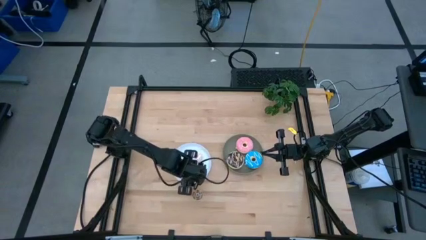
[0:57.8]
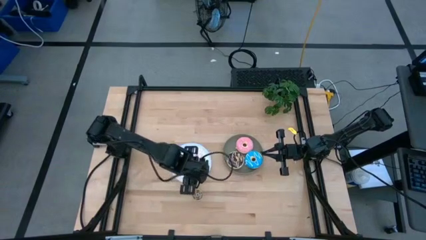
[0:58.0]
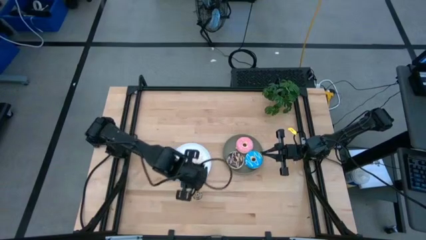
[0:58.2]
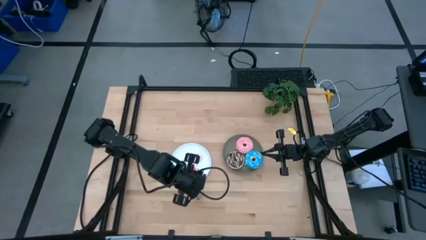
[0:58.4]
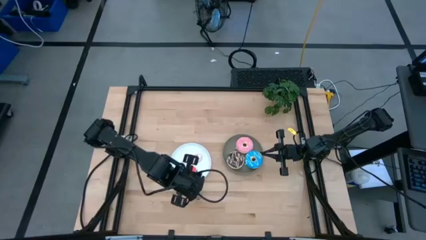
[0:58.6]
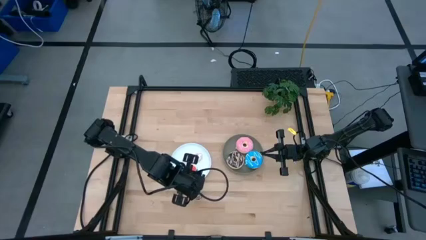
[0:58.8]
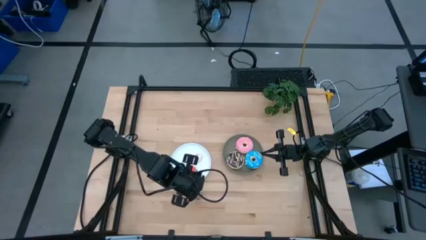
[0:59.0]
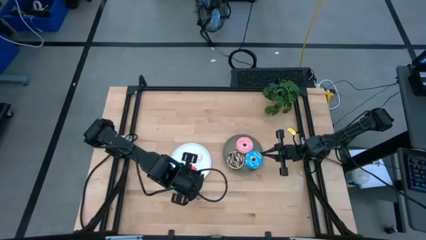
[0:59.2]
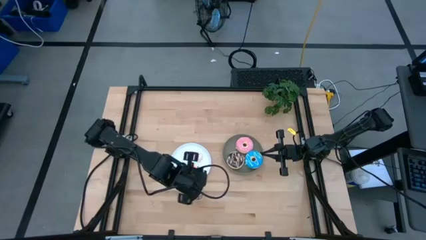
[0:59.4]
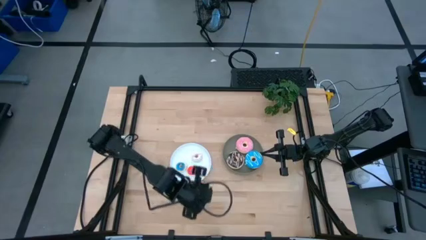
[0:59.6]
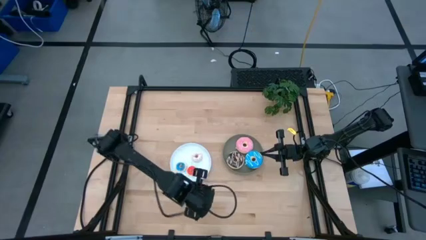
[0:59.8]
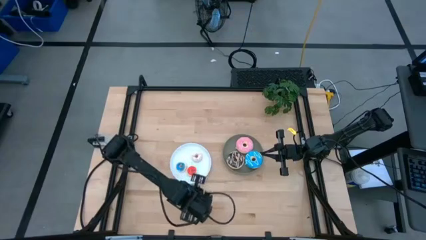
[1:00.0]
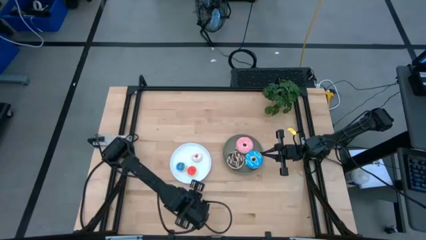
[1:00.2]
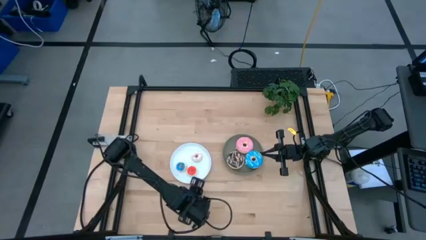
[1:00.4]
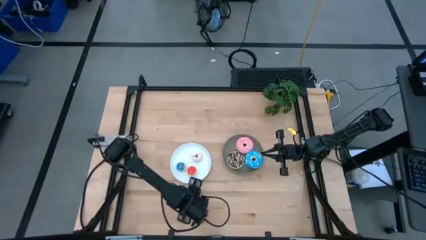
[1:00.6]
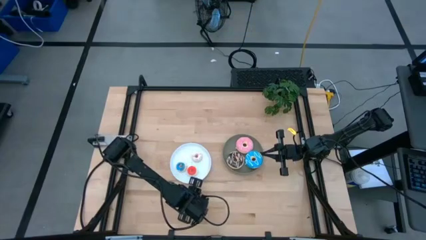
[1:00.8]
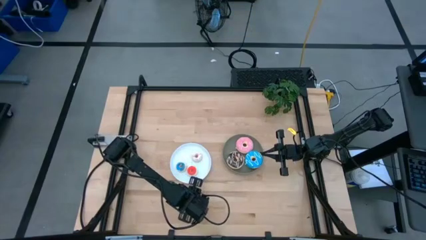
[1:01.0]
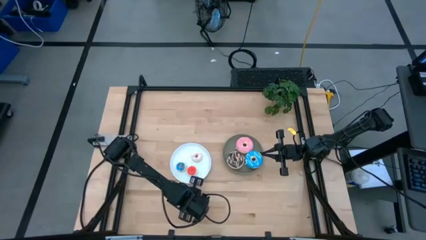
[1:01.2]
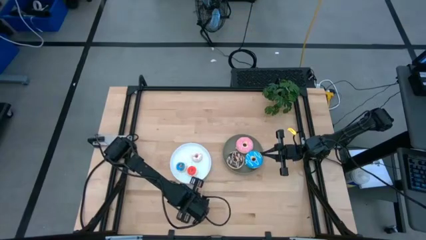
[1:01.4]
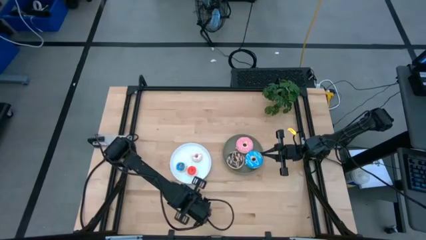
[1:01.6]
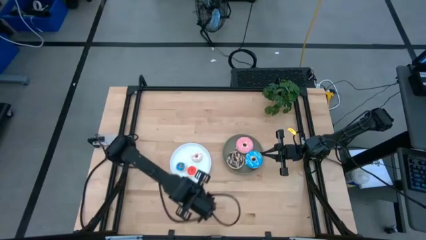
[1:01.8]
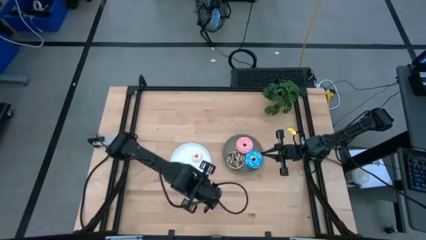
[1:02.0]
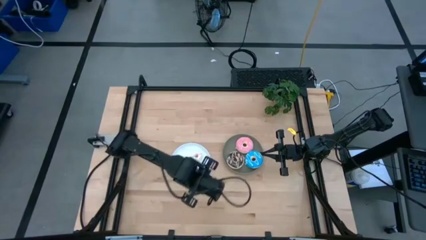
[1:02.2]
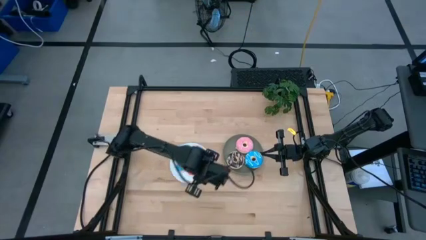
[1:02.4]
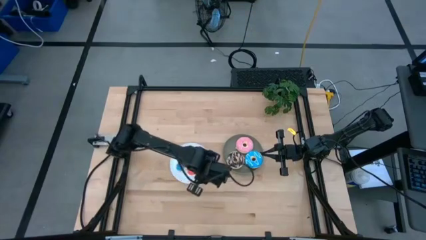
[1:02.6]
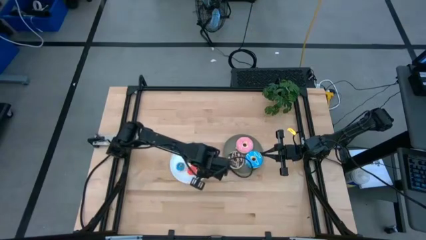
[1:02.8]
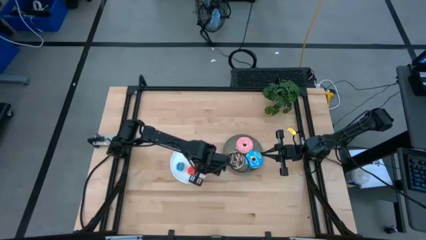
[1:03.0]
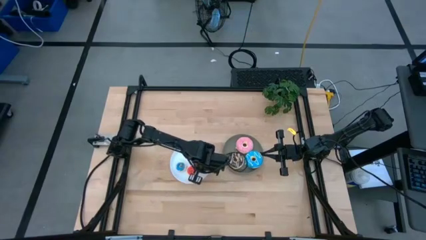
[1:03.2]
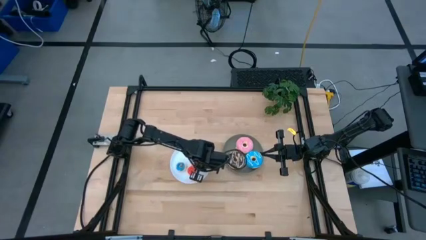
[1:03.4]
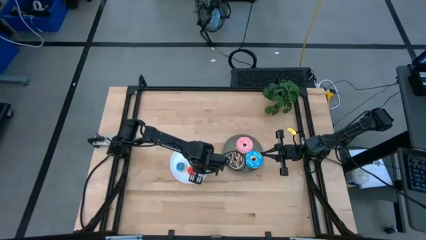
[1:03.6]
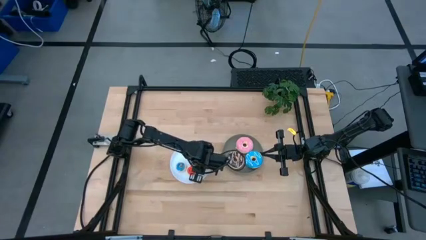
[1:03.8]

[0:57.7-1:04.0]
Task: Pick & Place donuts
Put the small brown donut on the white plate

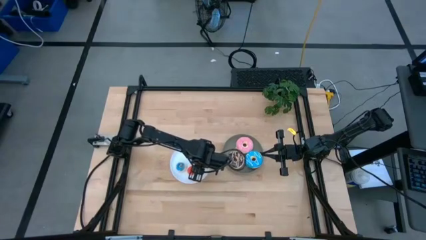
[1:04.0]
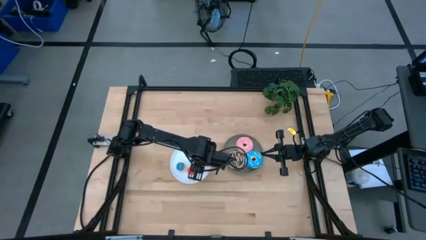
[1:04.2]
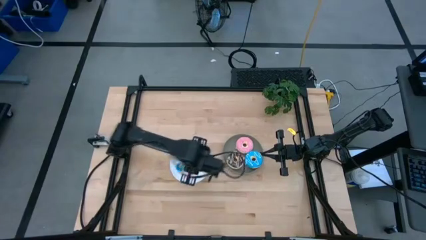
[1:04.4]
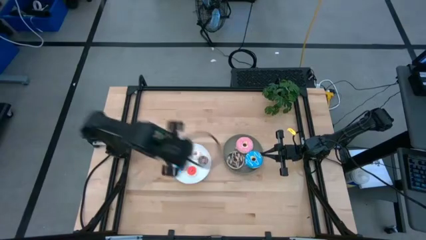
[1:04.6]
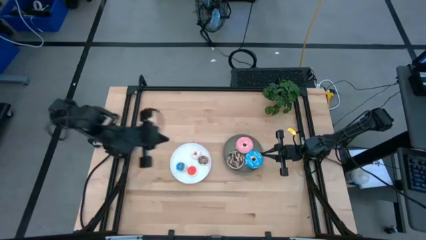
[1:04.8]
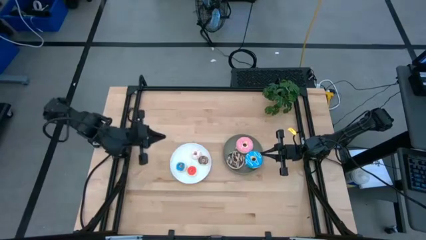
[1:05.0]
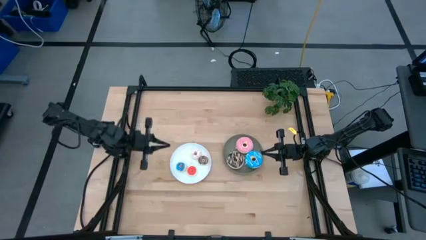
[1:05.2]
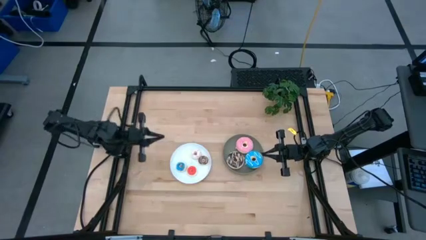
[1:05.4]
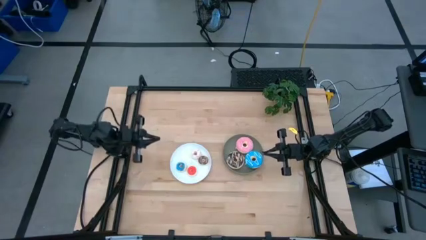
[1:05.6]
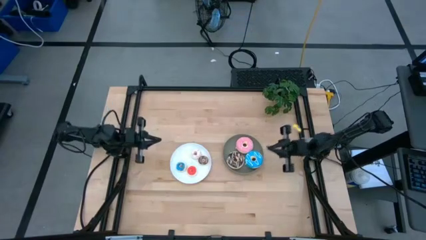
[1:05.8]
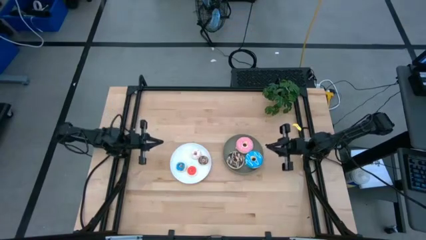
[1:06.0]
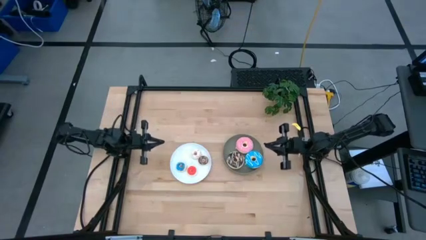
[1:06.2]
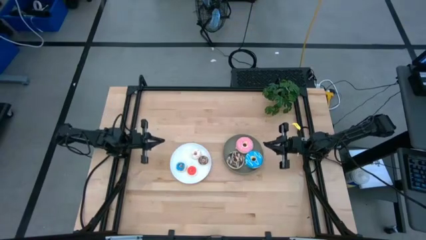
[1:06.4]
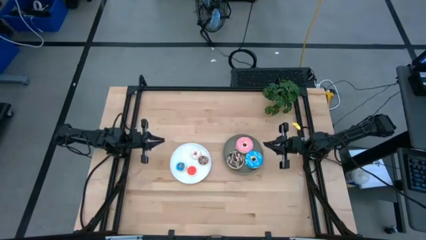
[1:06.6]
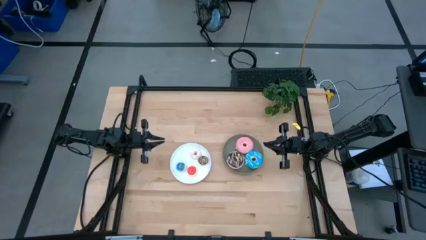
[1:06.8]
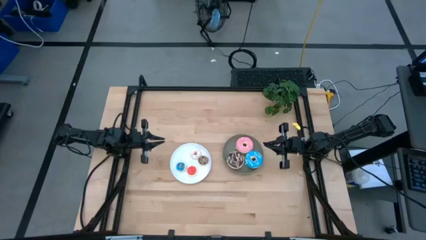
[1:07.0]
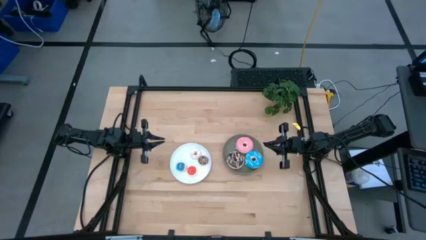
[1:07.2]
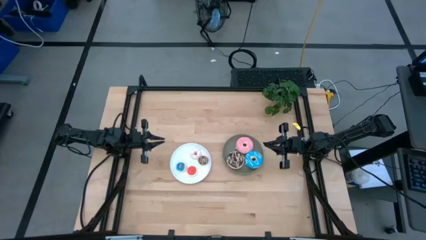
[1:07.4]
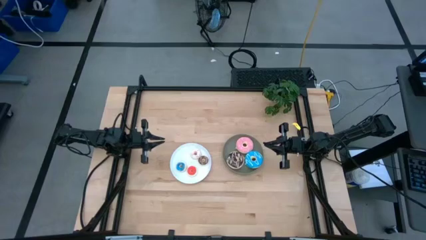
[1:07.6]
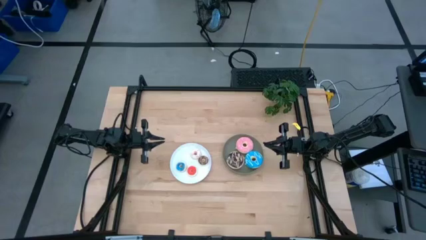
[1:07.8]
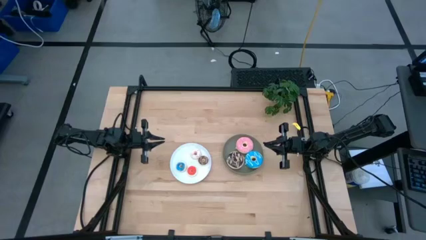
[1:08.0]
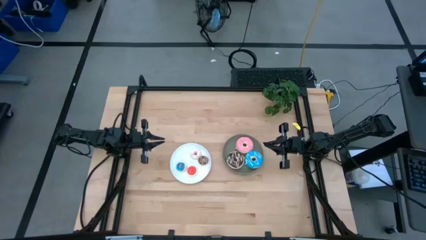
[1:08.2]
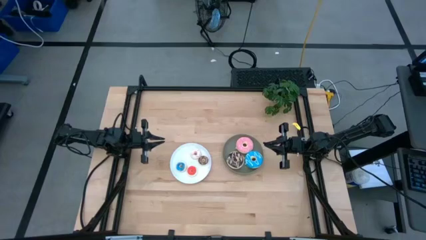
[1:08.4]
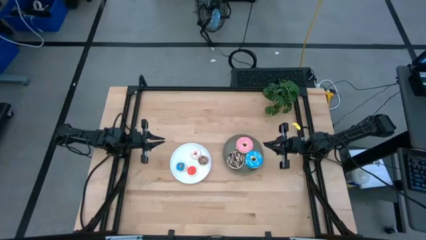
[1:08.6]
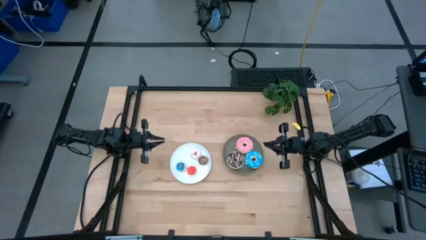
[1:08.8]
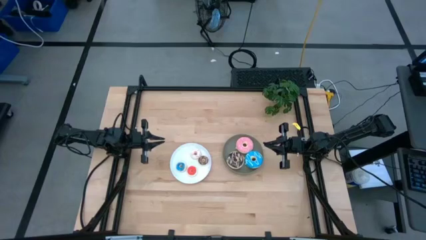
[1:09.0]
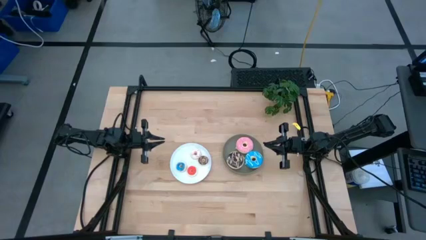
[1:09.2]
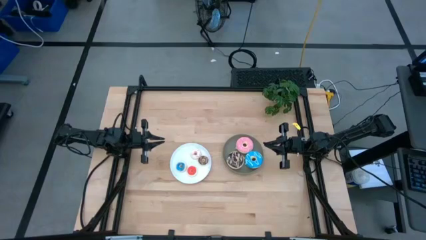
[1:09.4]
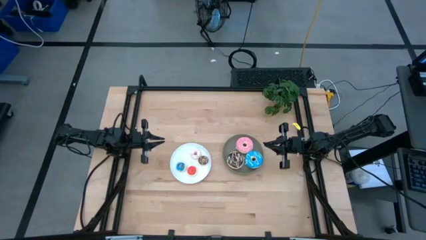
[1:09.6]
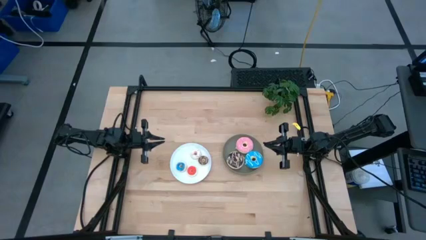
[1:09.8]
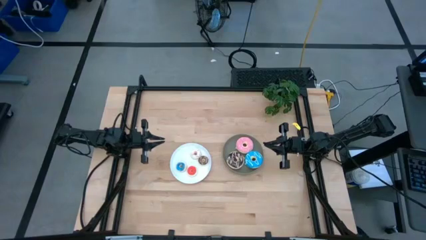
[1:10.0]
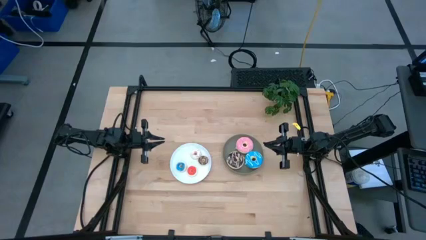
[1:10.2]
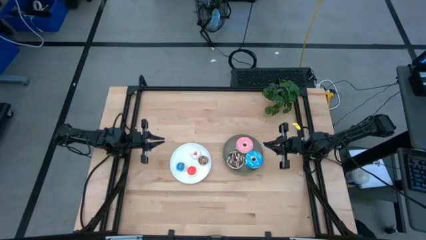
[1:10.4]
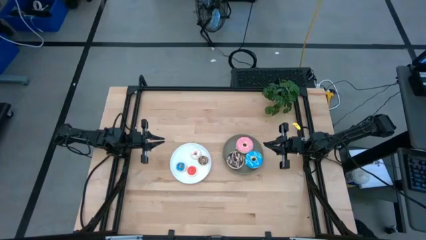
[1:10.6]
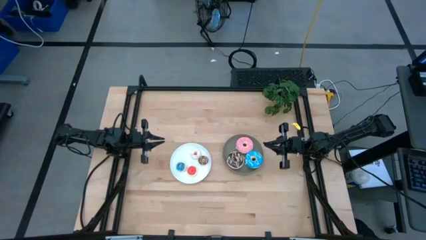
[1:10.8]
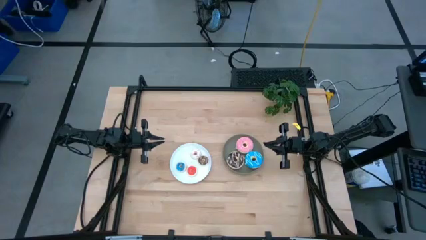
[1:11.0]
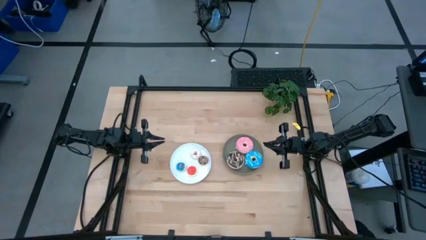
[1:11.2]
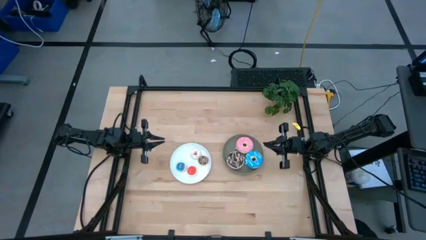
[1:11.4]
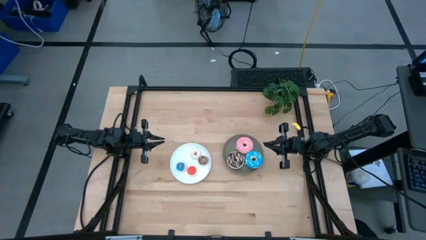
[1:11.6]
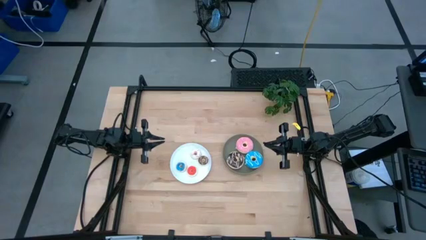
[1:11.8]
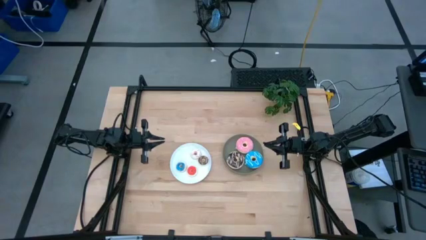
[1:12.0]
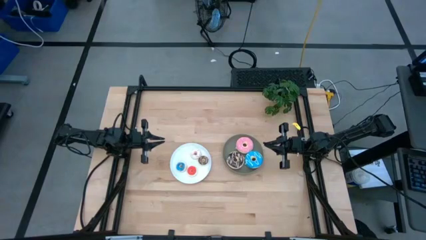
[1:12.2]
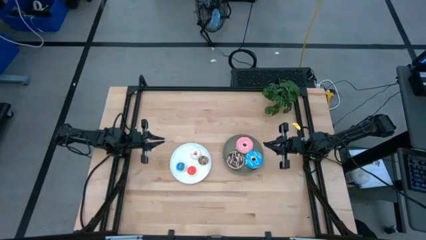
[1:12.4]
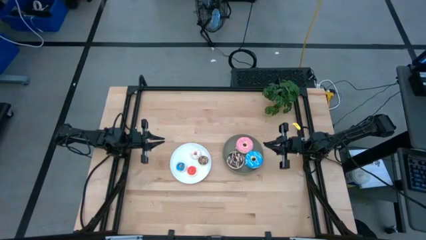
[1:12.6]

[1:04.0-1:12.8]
Return to Home Position
